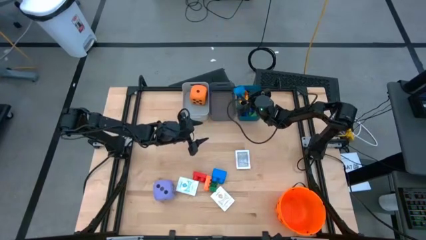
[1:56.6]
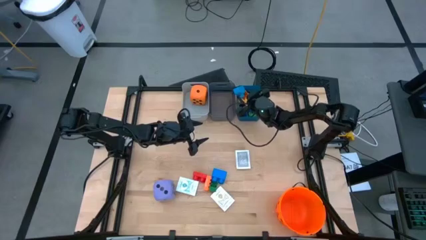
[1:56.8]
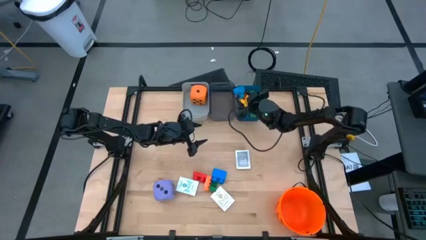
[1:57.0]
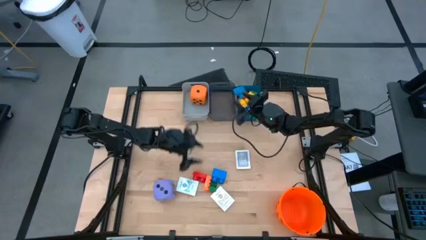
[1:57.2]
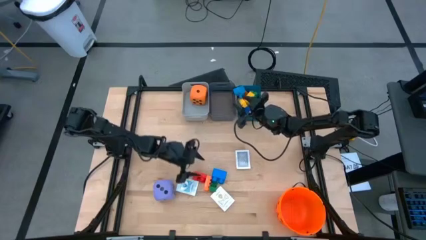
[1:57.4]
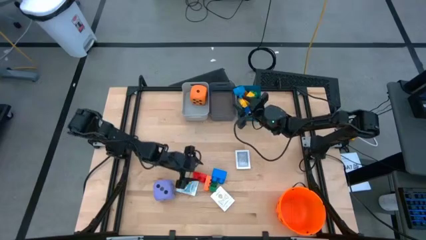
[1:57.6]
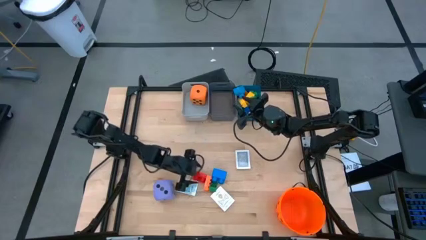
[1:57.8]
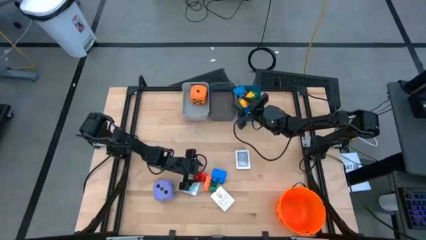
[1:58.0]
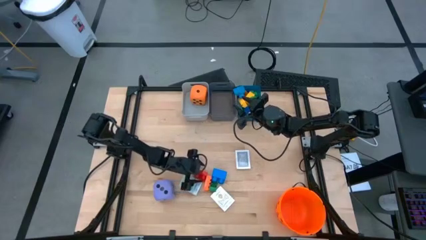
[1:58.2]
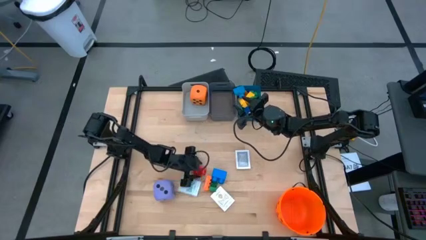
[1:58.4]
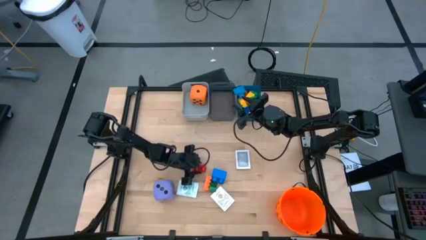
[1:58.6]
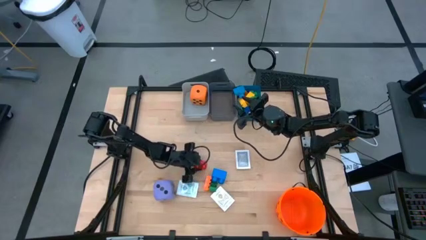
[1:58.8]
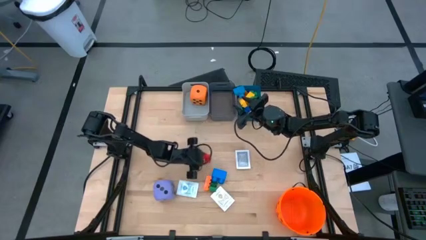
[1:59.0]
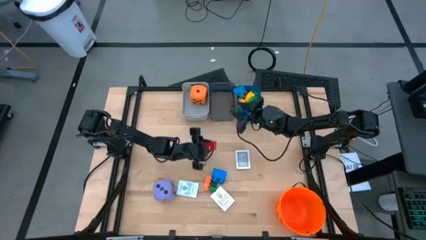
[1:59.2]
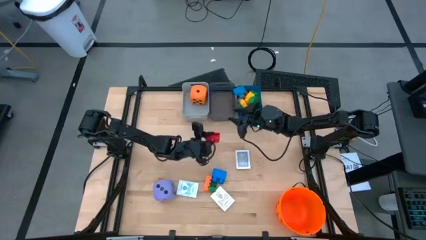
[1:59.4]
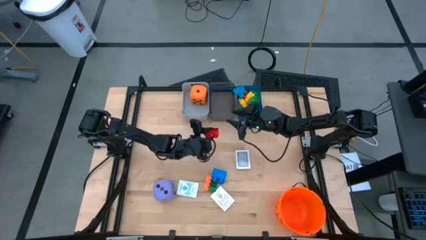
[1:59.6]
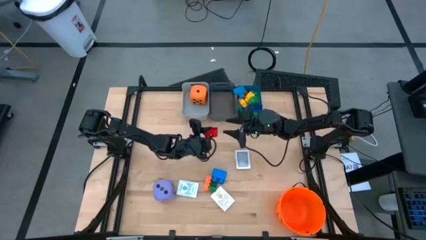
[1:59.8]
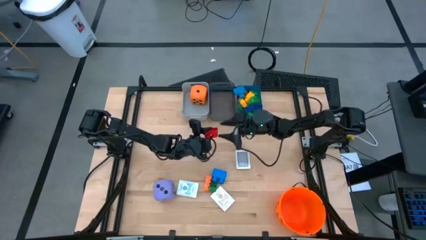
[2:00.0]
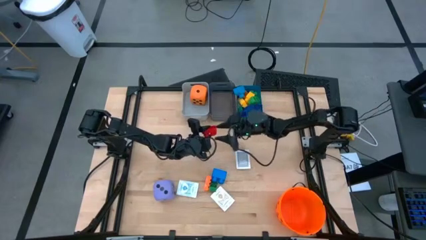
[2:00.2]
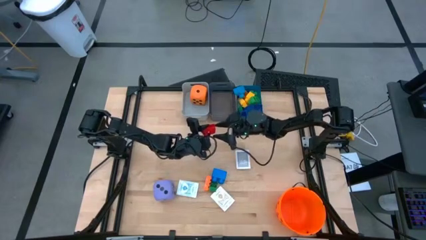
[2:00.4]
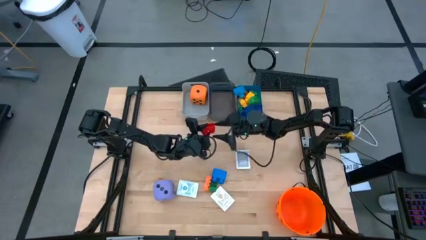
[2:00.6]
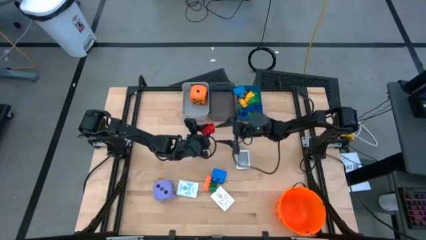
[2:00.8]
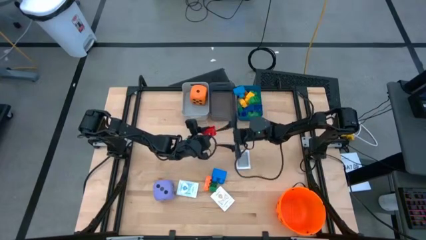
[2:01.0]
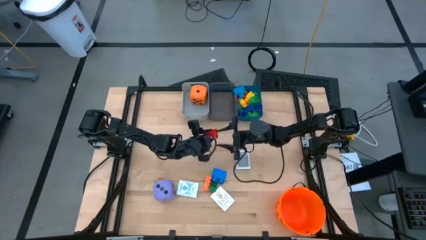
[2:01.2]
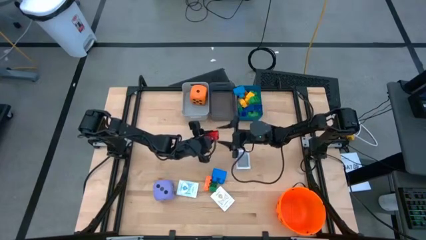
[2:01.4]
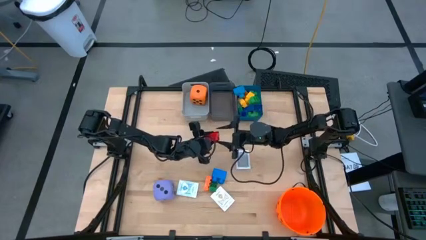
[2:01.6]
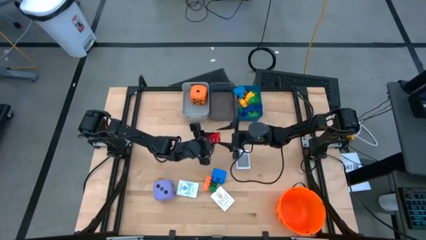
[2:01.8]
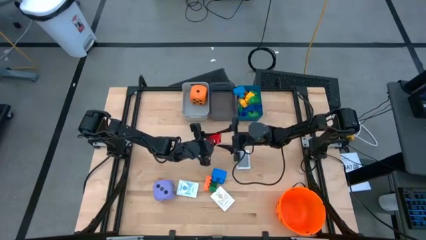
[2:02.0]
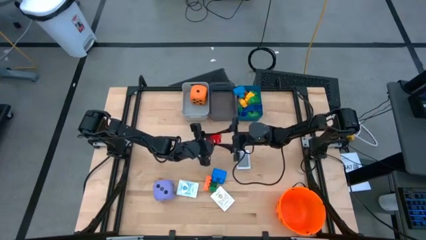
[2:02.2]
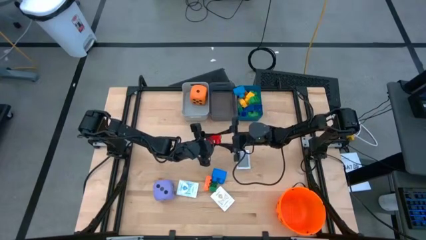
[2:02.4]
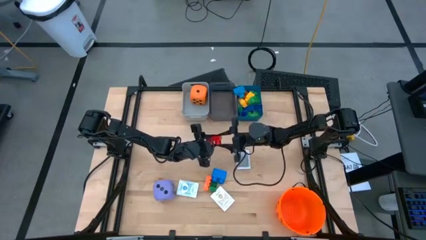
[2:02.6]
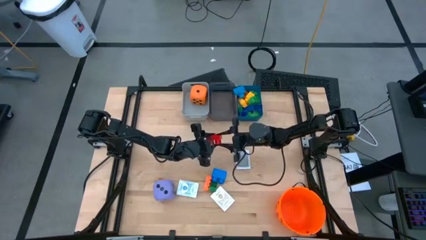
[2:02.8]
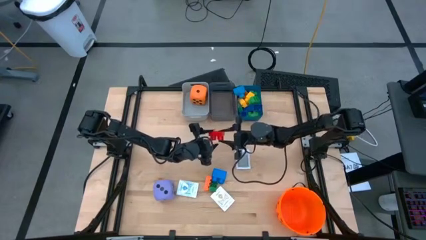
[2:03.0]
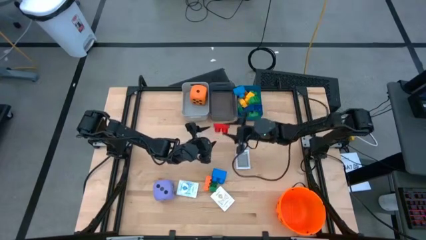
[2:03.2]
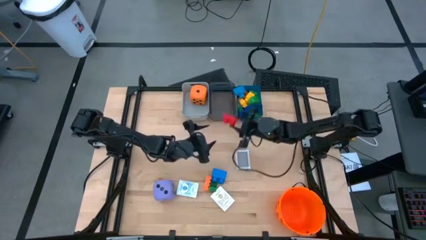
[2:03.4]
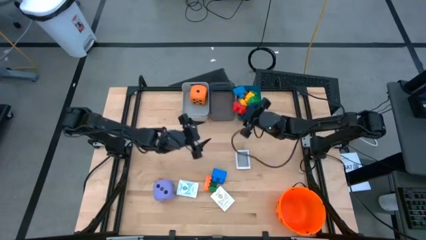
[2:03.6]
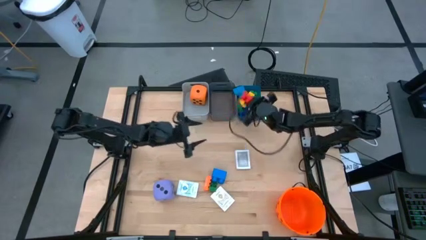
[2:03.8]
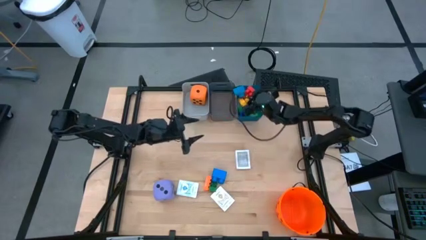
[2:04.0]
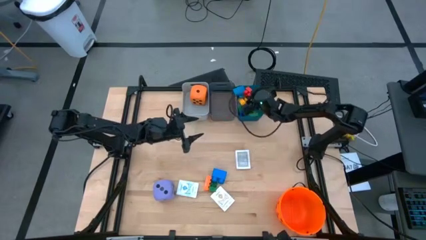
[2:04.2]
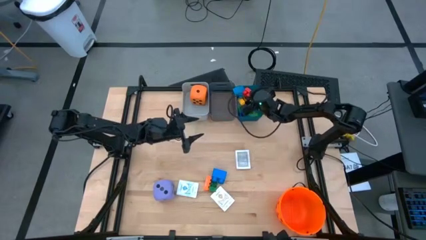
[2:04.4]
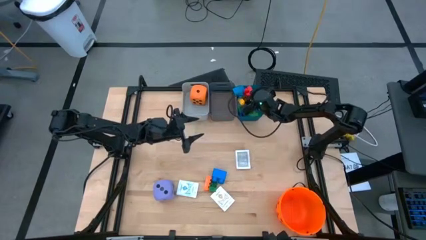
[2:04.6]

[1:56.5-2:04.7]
Task: Pick & Place Toys
Put the red game piece into the blue bin

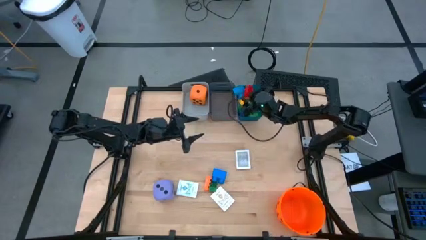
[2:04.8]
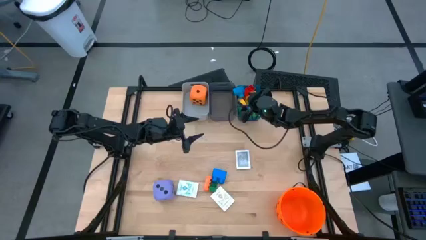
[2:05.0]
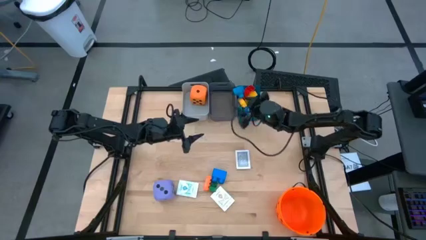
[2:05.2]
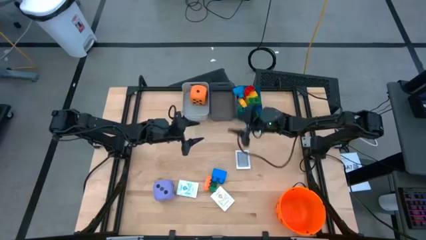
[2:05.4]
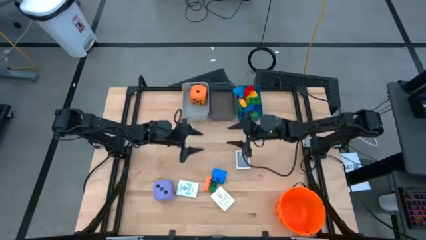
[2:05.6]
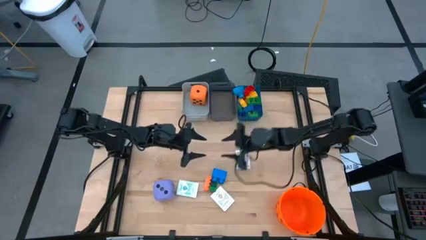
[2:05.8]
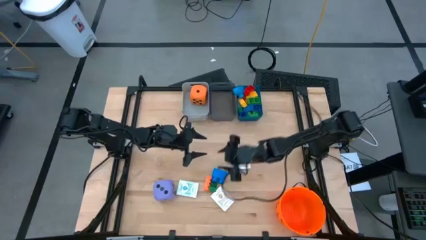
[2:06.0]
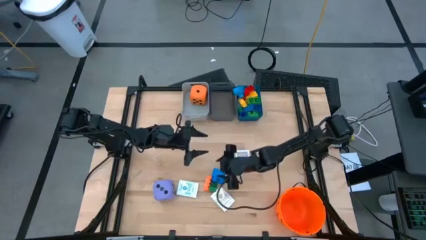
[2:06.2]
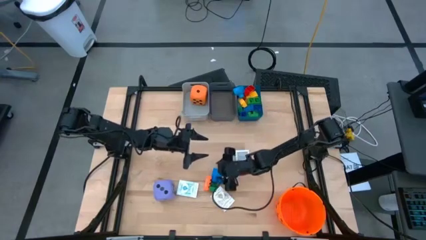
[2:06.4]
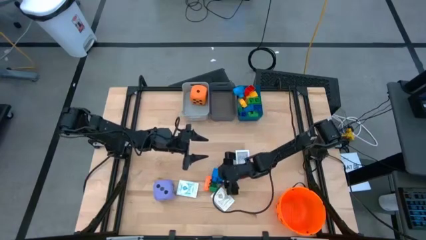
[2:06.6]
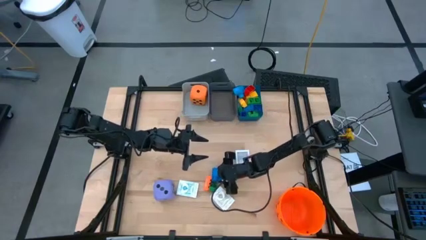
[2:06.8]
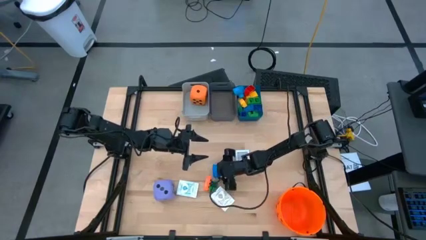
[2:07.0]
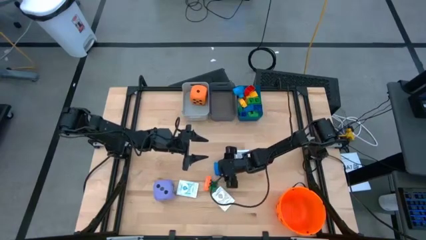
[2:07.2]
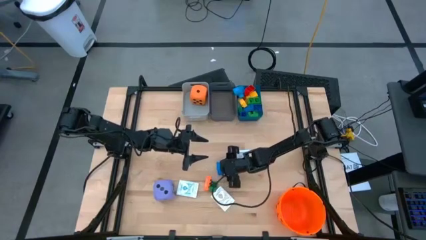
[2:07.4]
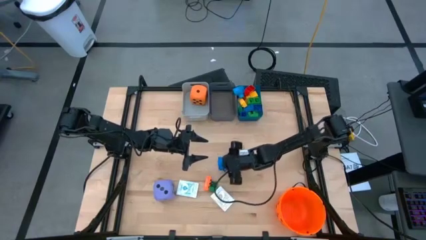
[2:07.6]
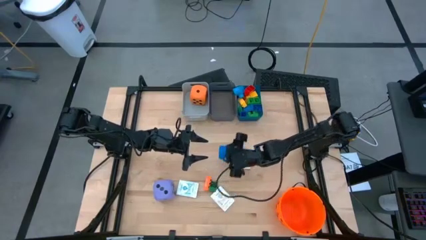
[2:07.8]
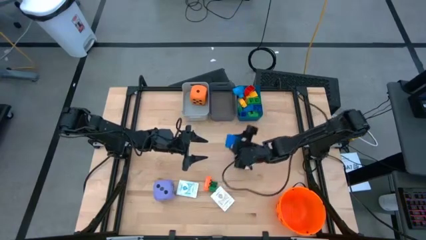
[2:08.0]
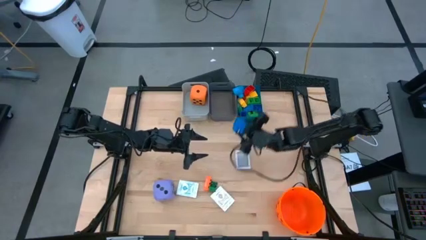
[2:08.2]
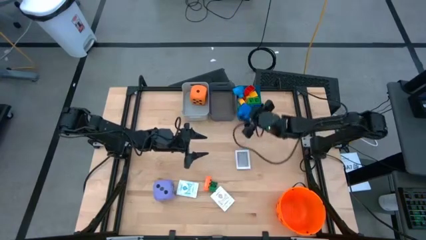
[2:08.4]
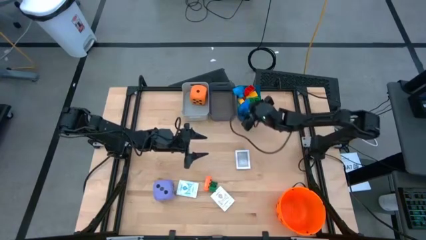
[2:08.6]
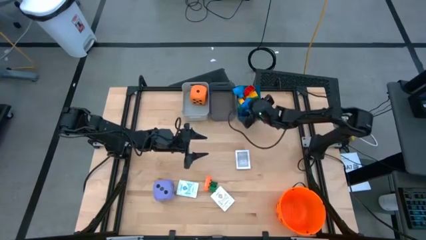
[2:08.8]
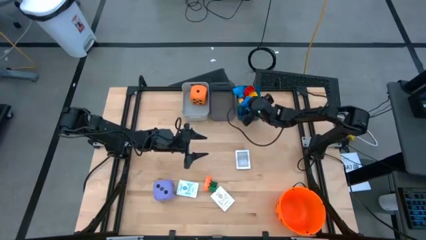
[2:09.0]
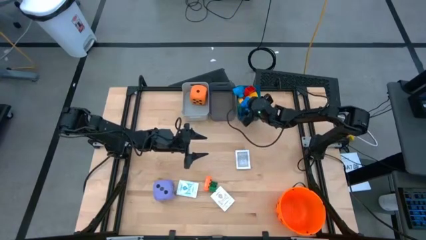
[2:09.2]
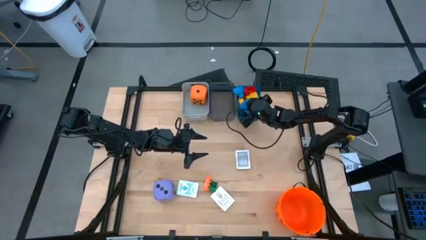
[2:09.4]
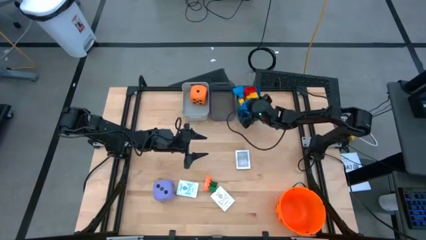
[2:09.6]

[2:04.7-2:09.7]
Put the blue game piece into the blue bin

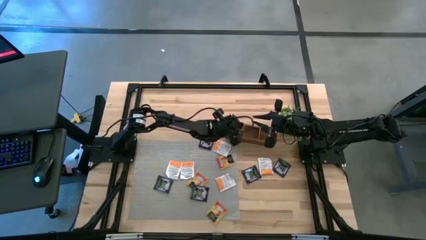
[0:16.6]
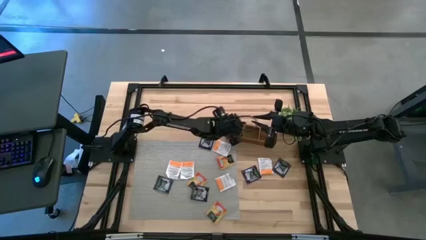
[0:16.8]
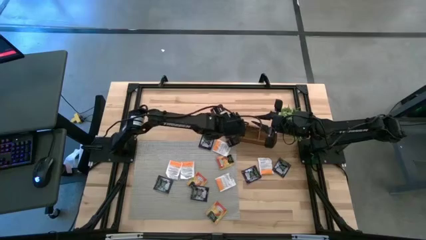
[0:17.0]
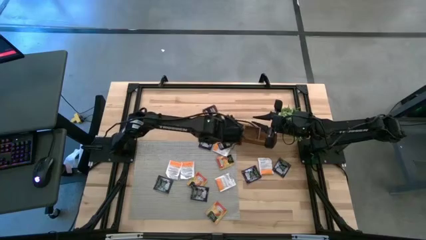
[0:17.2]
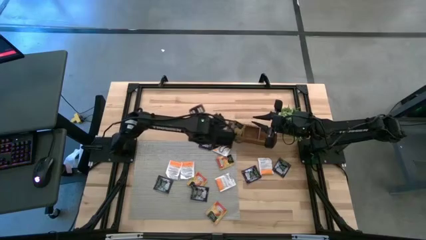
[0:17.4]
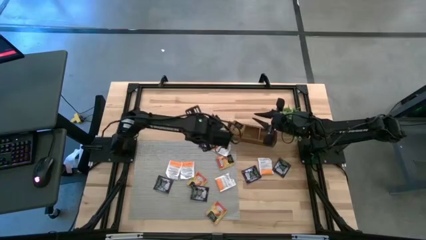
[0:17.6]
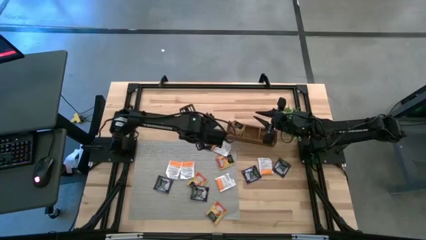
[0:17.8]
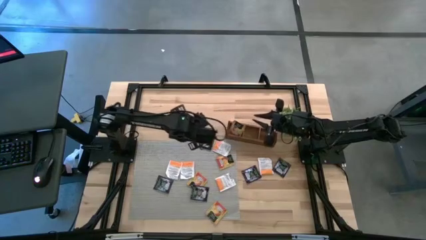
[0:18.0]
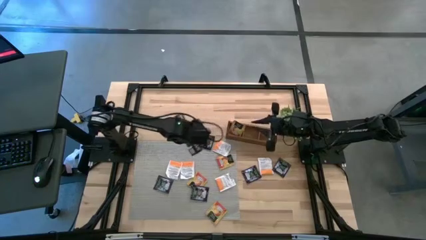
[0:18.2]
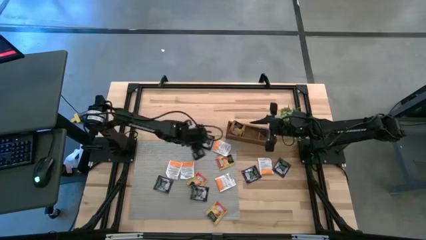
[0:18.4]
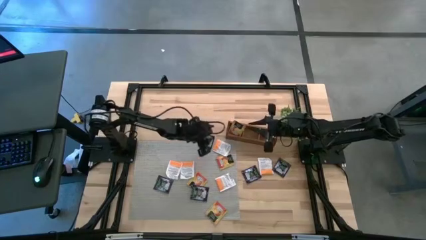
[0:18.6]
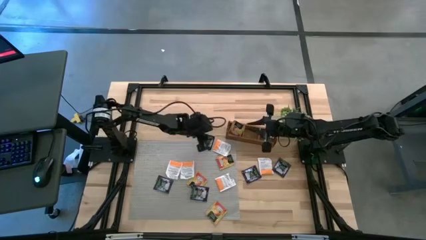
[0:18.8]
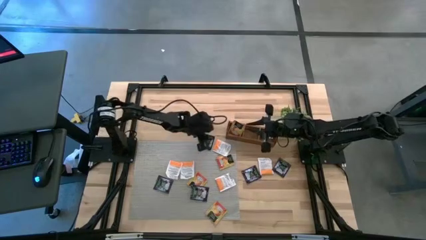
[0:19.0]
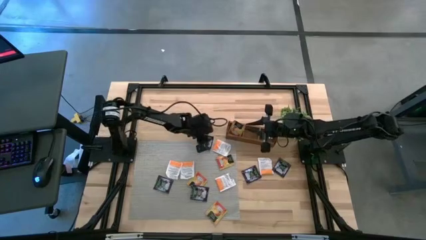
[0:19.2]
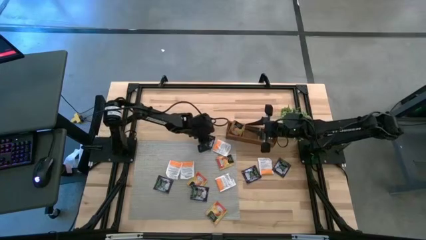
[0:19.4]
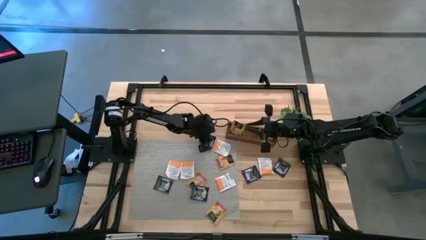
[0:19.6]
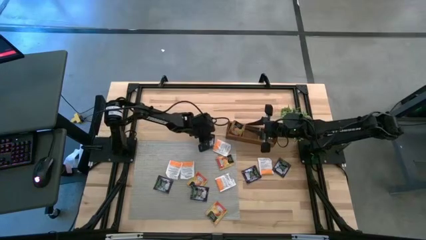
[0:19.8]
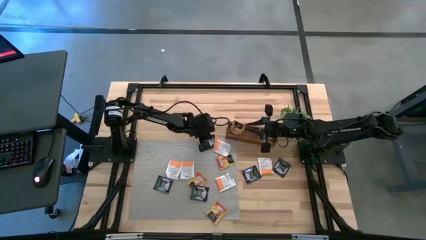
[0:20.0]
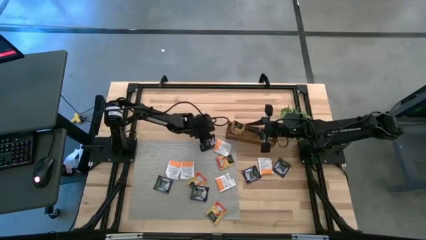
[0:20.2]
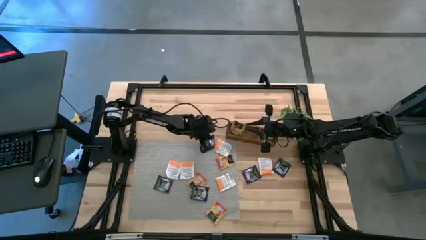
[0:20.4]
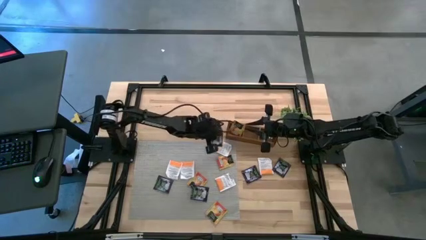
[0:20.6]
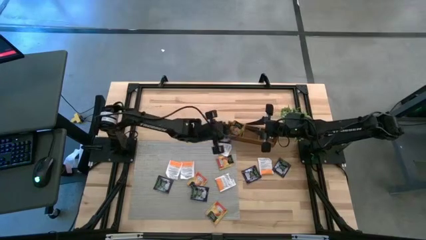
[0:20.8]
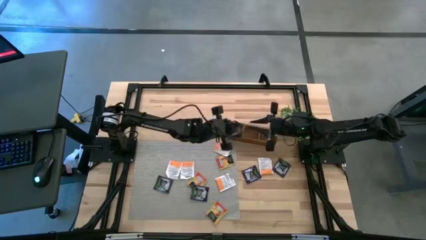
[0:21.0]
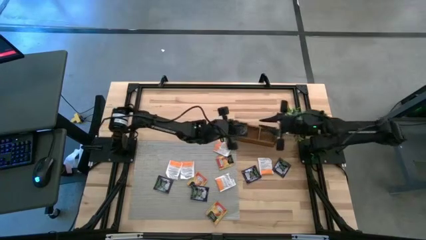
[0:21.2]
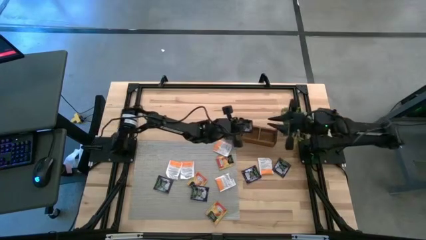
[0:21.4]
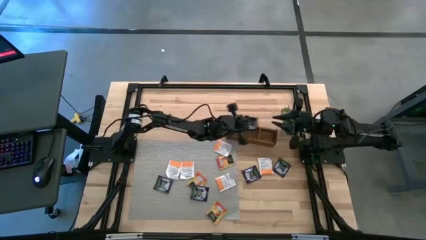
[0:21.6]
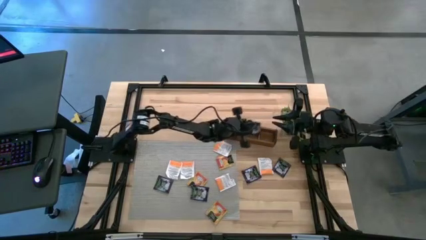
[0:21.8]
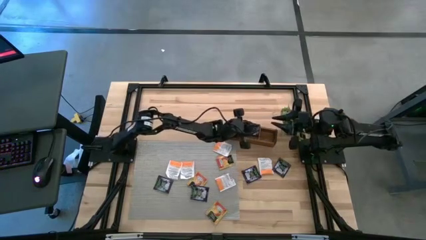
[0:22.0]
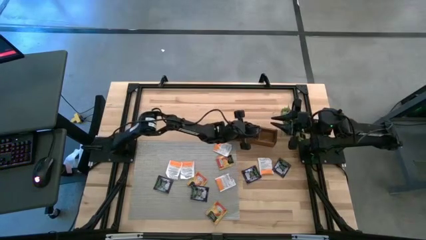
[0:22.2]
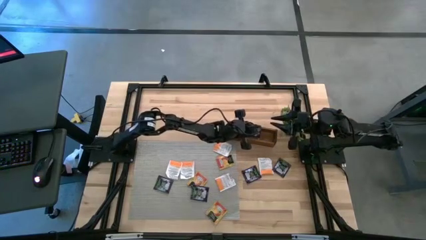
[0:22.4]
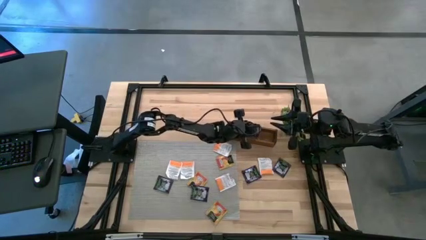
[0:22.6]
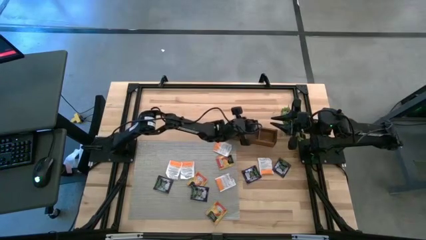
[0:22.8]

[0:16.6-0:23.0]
Task: Pick & Place Tea
Put the dark purple tea bag in the middle section of the wooden organizer
